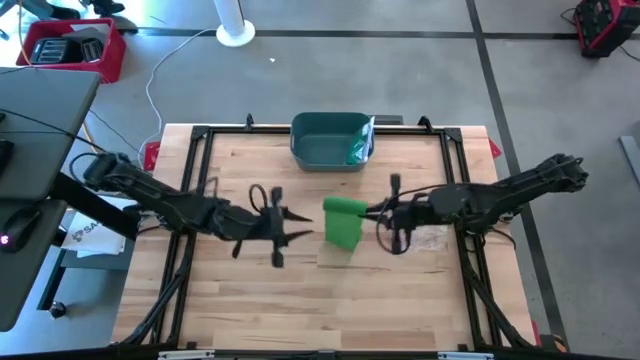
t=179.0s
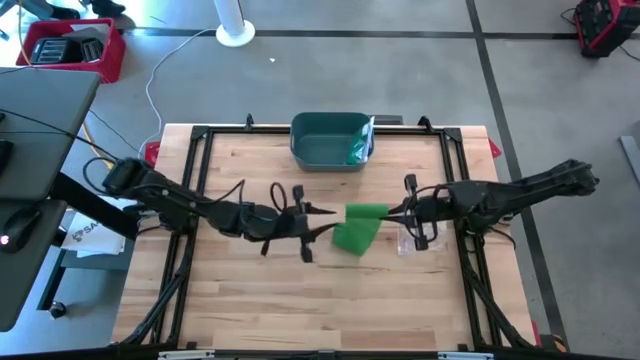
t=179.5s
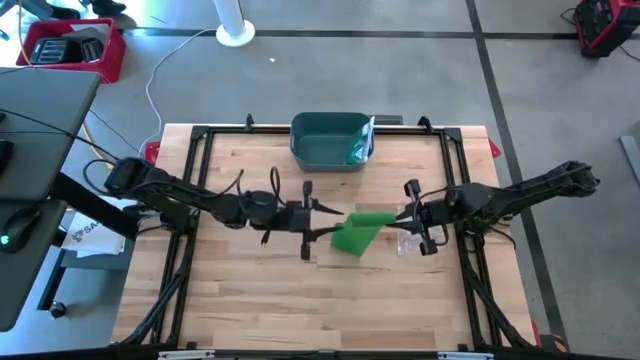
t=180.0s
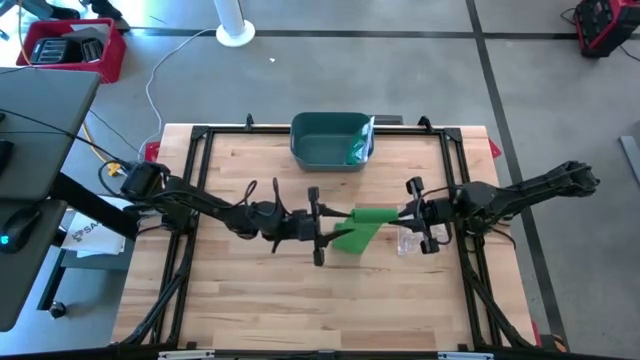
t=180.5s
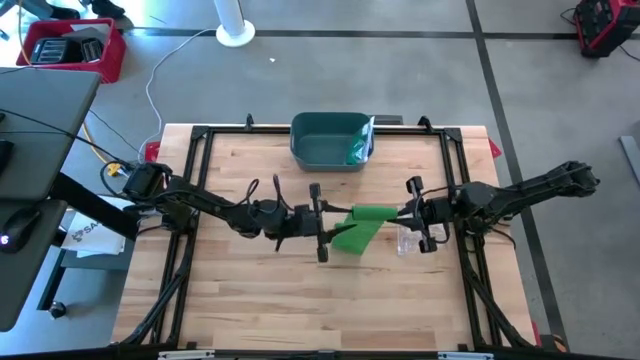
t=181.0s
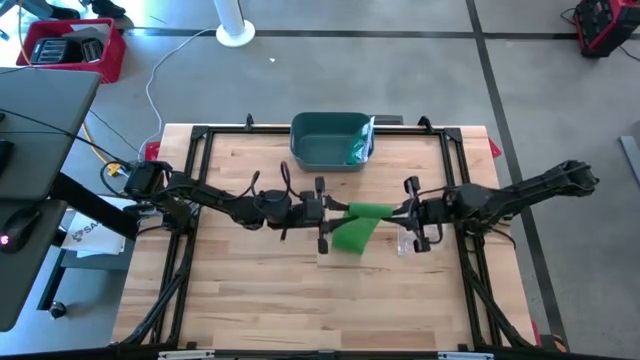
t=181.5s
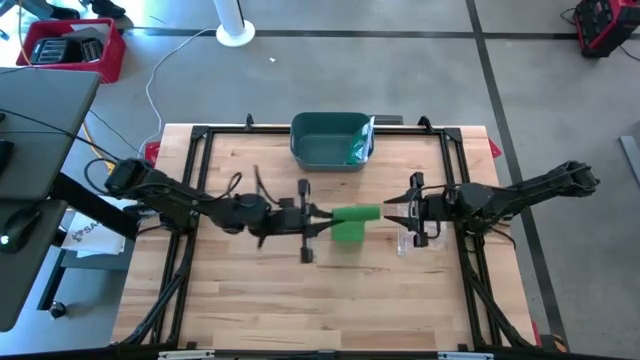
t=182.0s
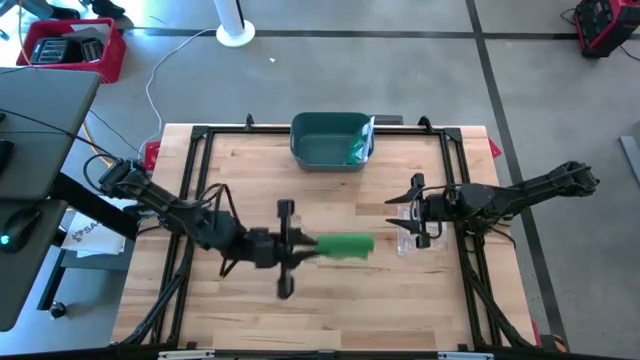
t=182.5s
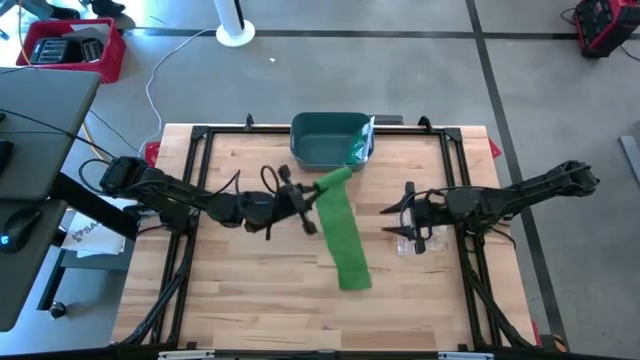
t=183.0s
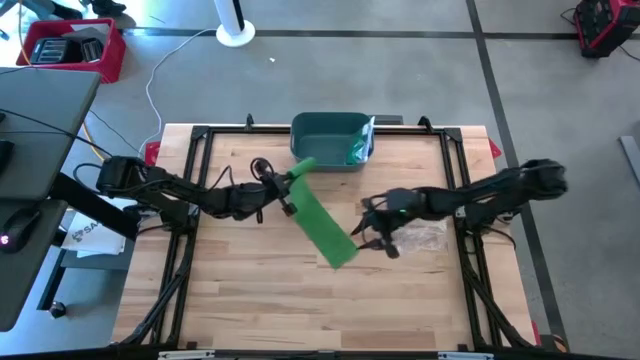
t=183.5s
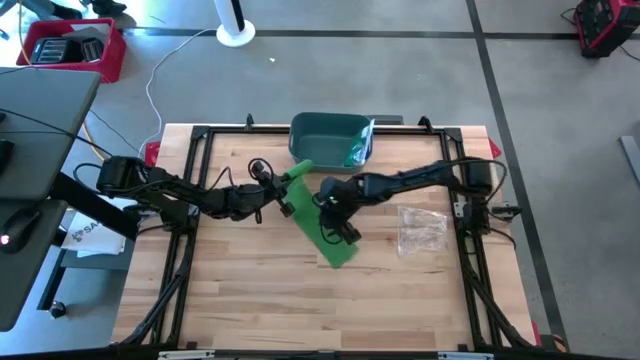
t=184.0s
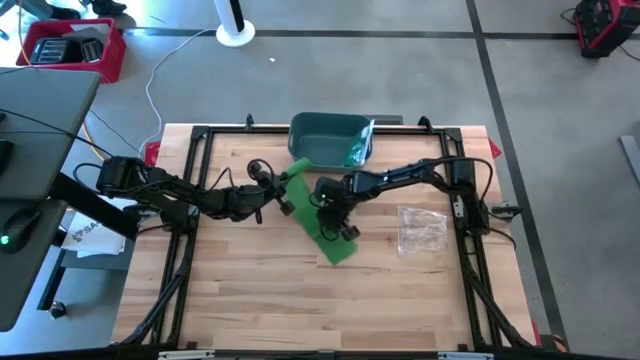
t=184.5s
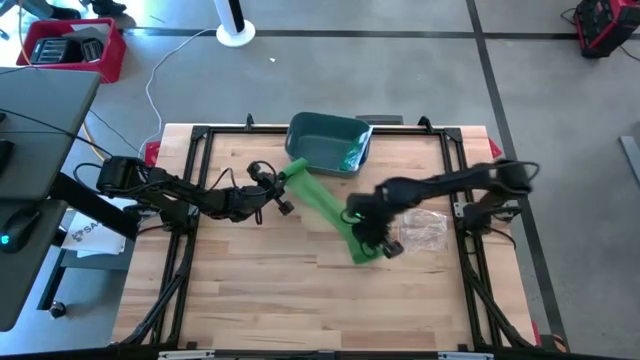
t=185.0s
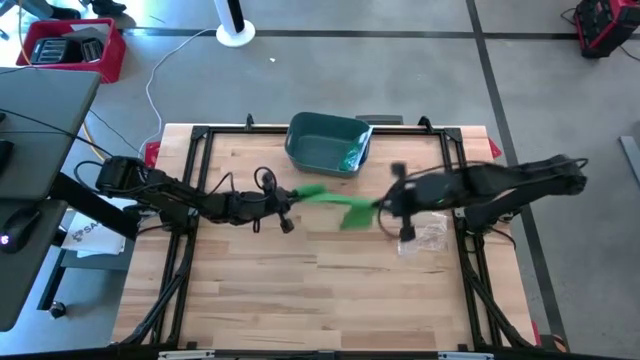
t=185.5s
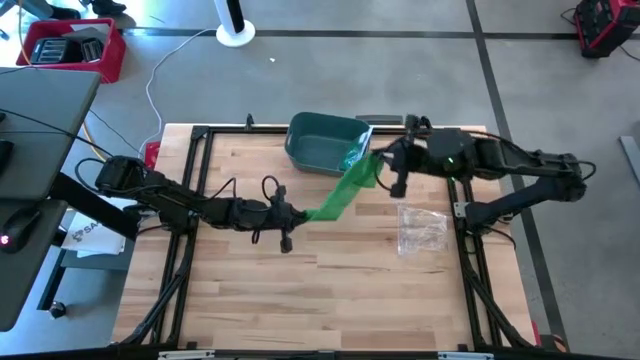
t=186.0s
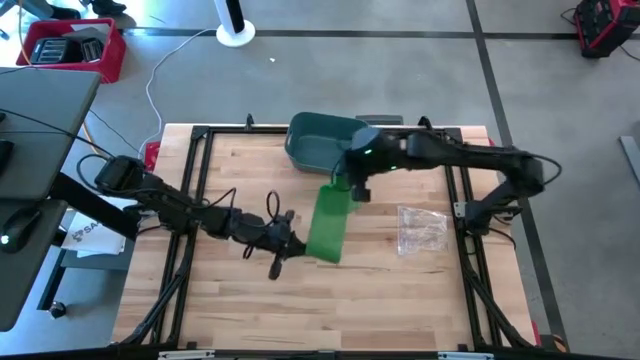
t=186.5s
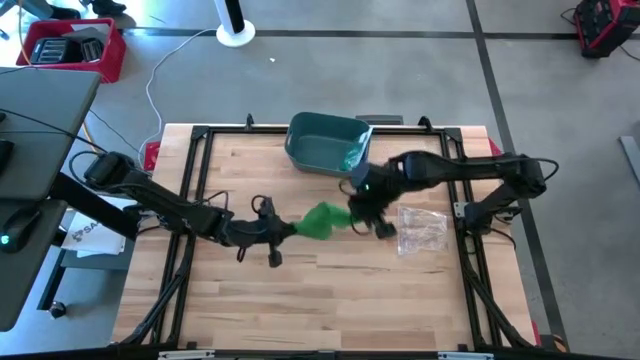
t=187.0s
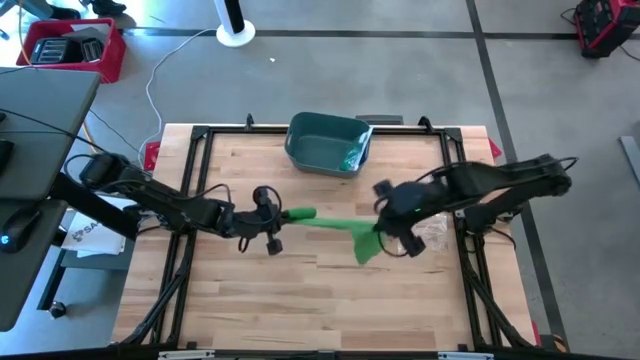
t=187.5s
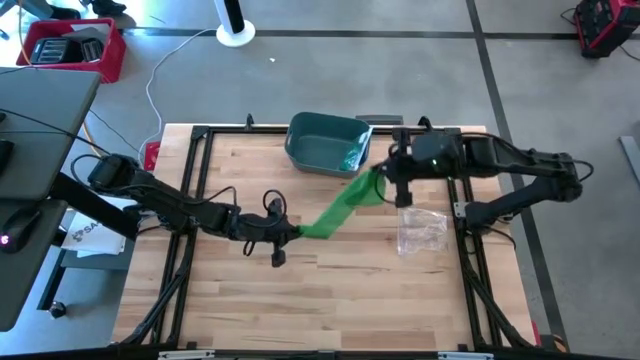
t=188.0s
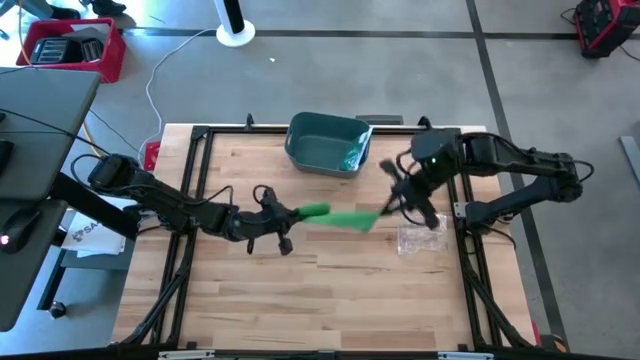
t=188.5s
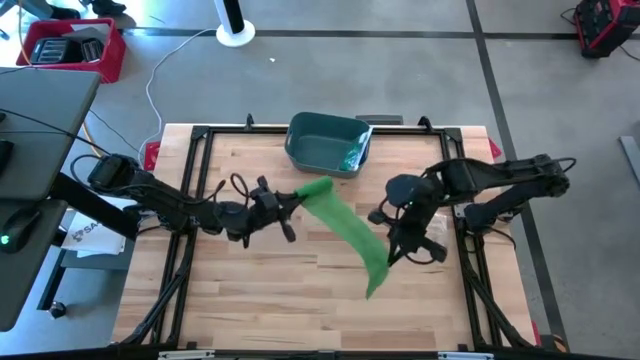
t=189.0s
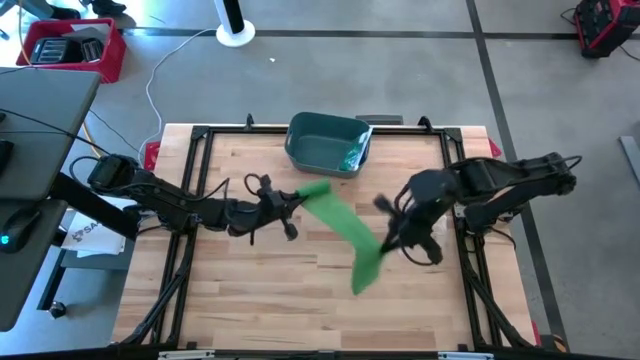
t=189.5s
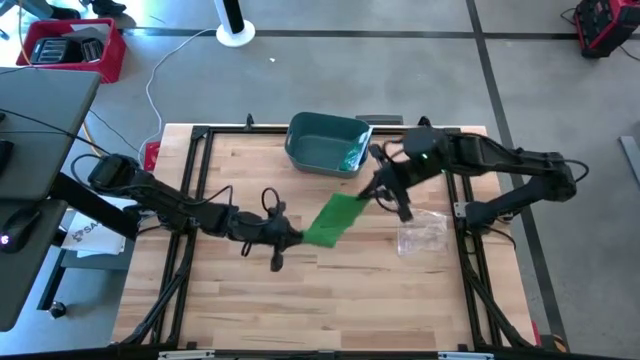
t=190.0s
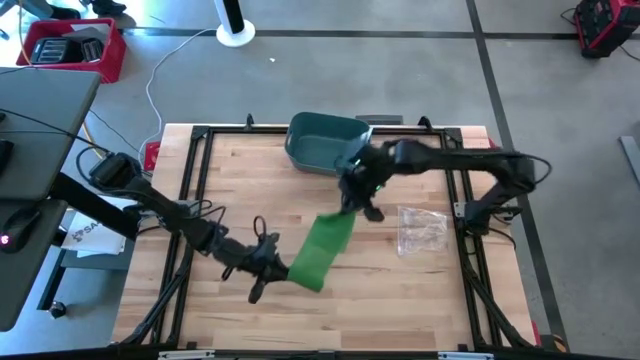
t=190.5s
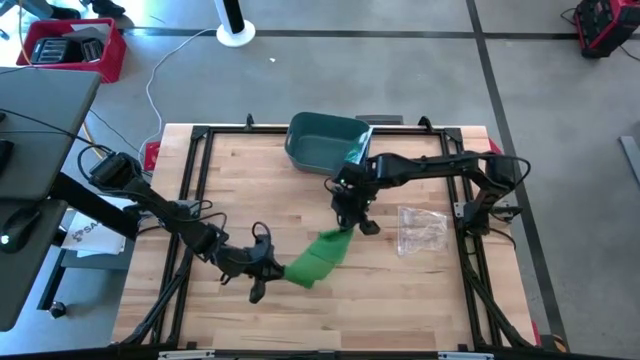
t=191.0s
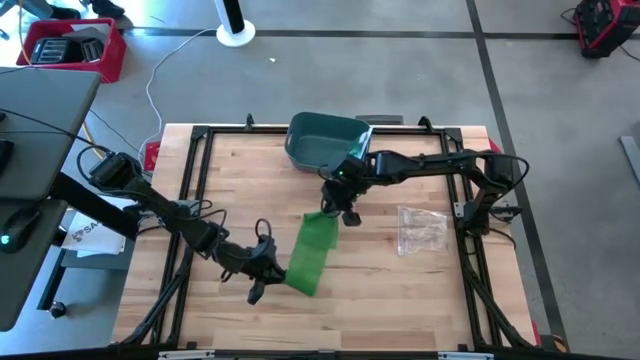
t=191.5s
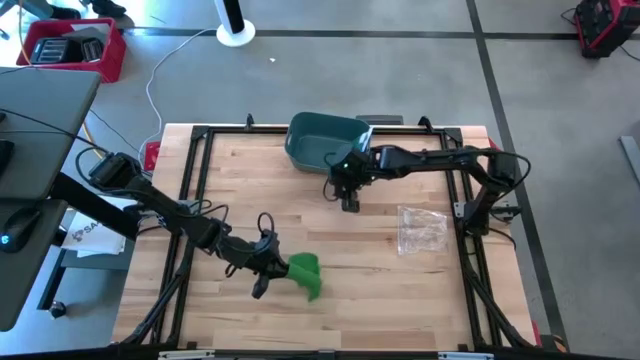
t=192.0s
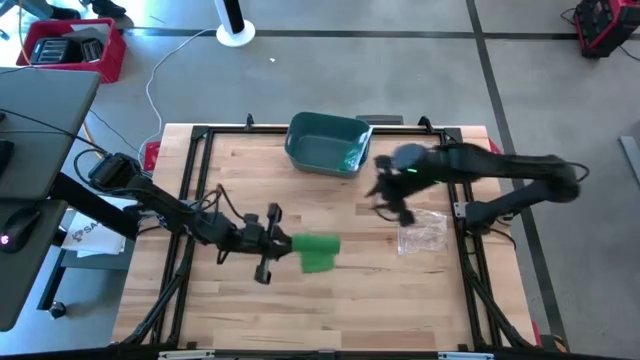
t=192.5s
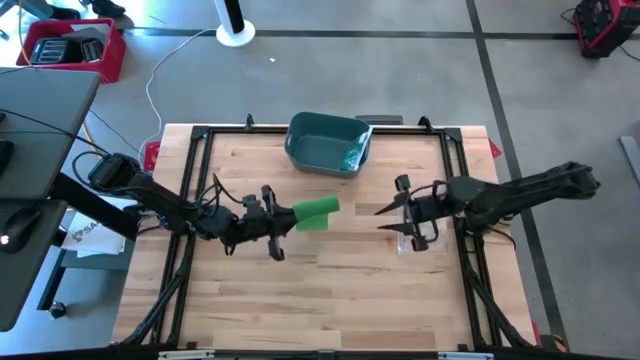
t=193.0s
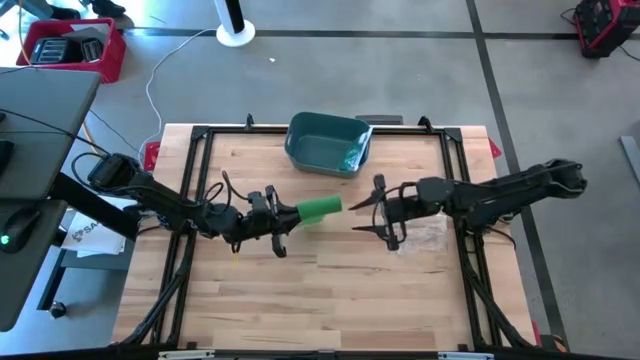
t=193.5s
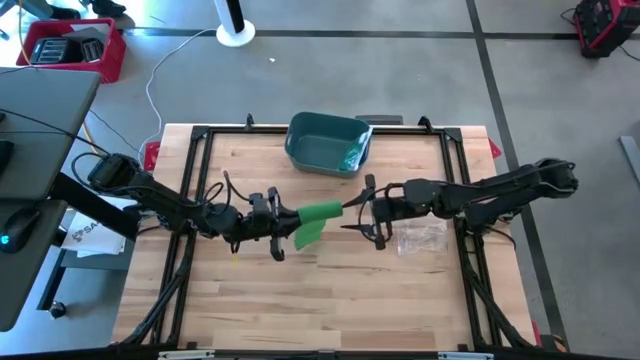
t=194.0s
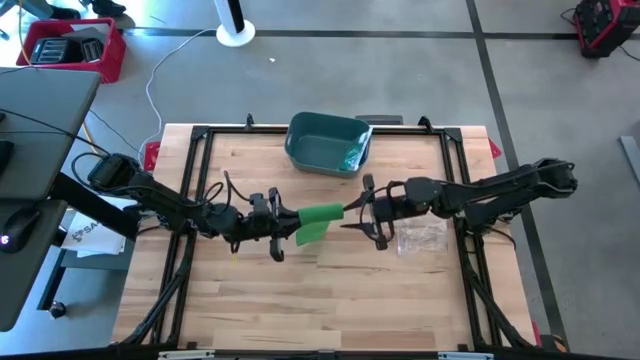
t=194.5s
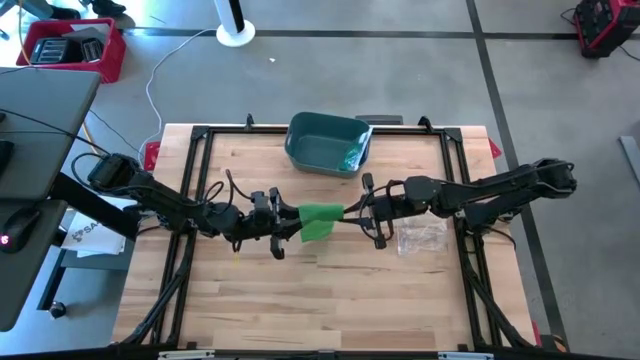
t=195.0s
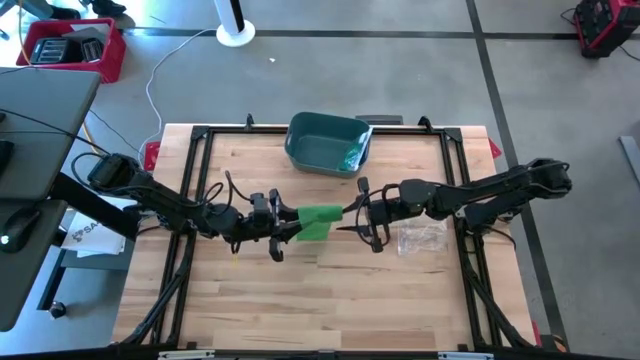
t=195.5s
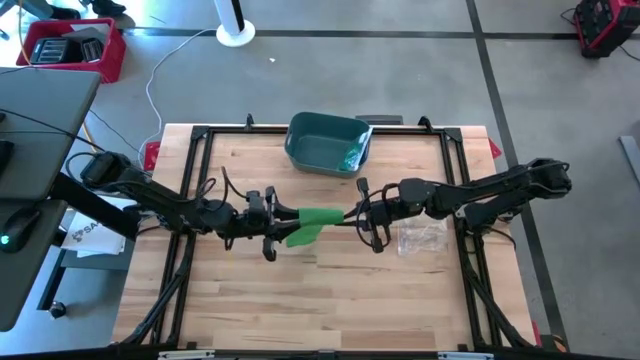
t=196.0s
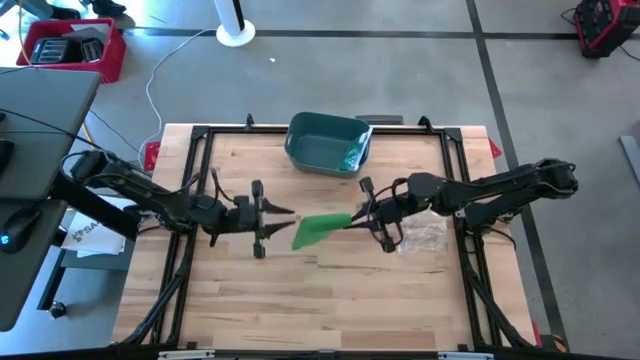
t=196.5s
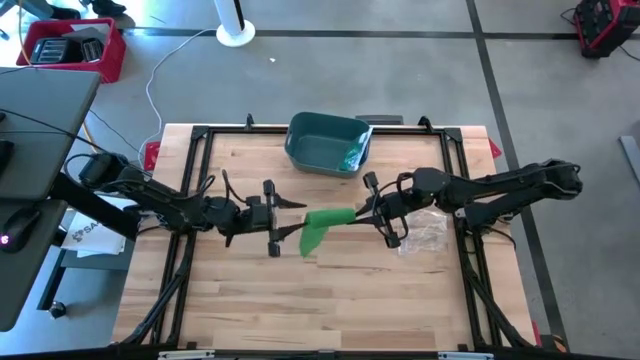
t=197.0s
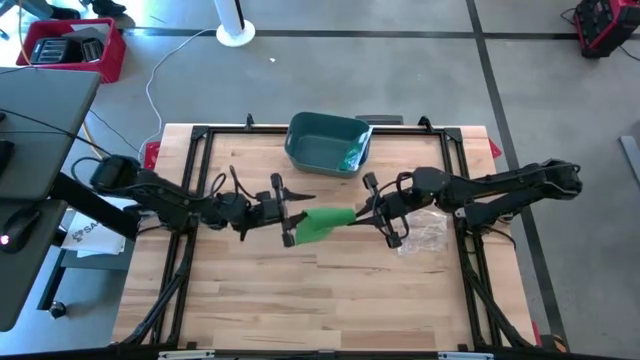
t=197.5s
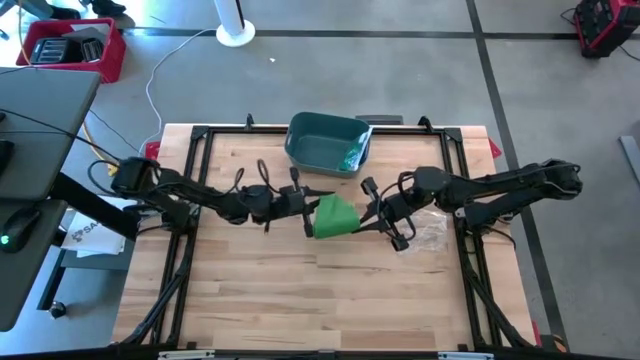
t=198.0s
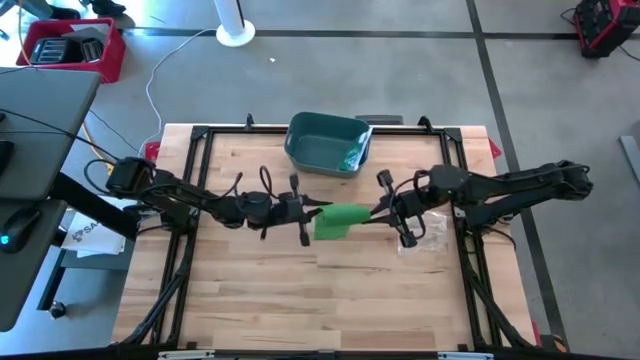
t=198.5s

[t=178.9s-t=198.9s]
Task: Roll bandage
Roll the green bandage
